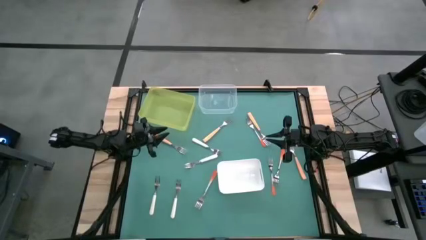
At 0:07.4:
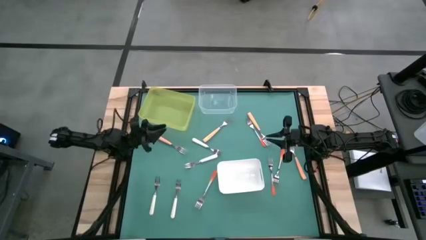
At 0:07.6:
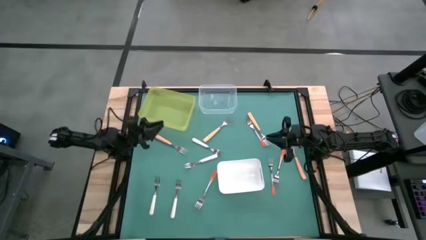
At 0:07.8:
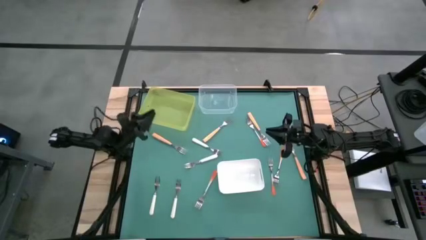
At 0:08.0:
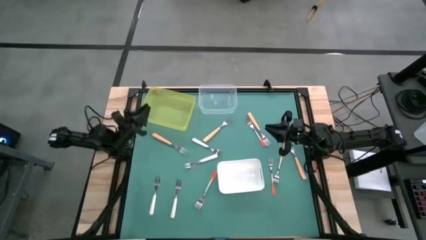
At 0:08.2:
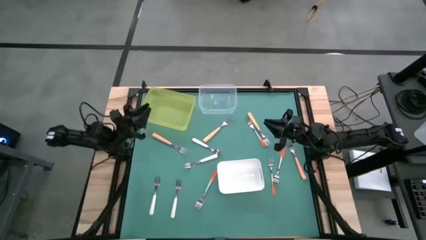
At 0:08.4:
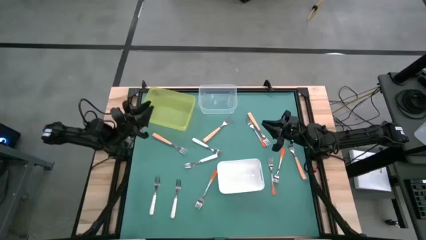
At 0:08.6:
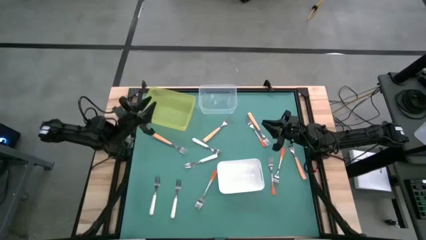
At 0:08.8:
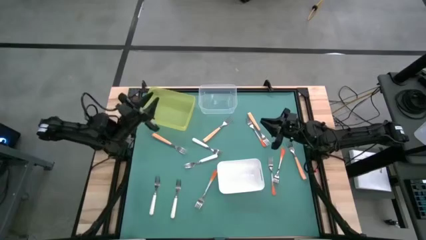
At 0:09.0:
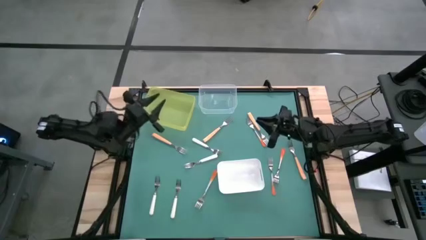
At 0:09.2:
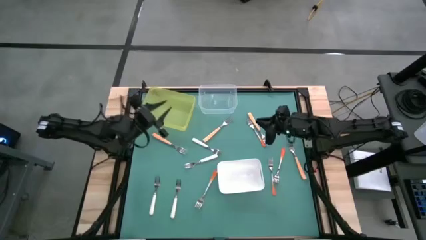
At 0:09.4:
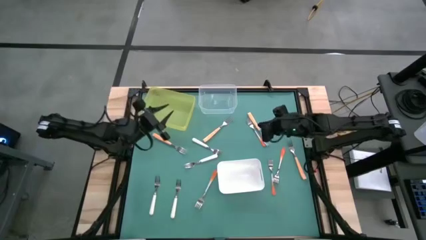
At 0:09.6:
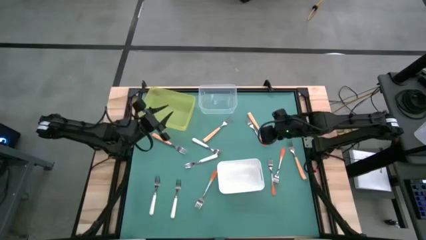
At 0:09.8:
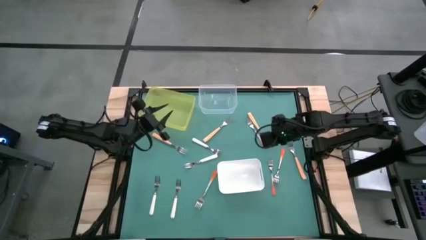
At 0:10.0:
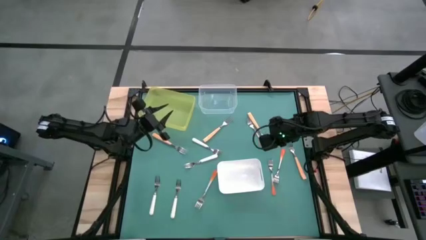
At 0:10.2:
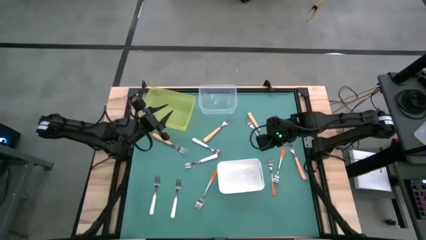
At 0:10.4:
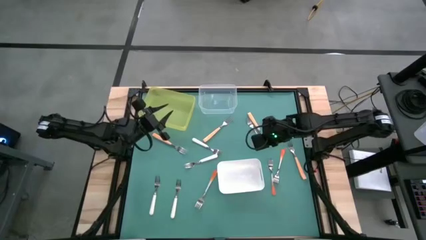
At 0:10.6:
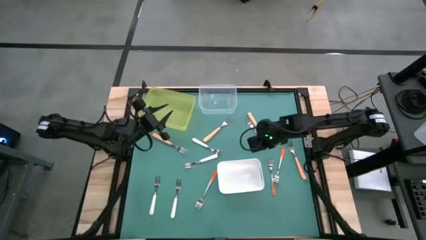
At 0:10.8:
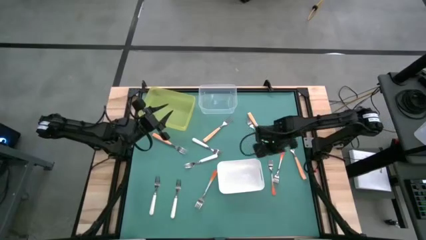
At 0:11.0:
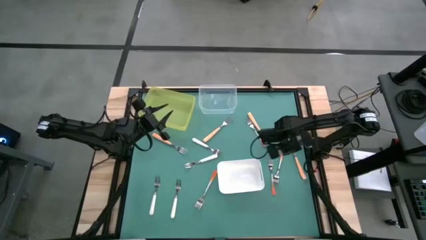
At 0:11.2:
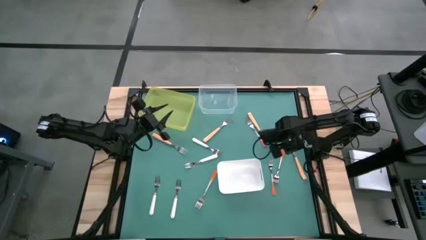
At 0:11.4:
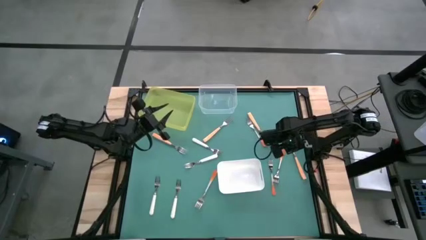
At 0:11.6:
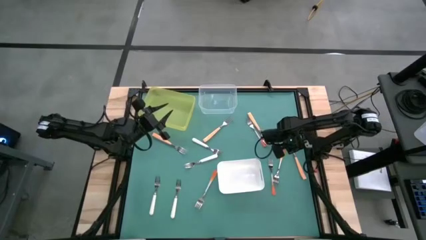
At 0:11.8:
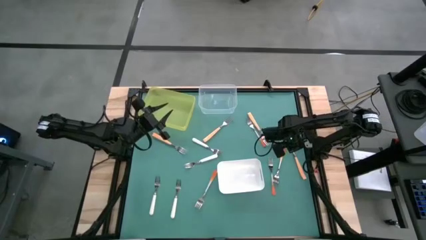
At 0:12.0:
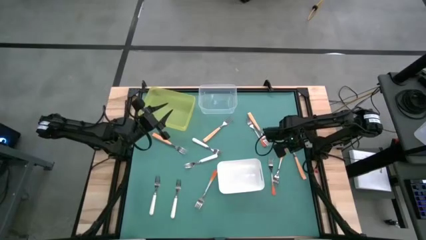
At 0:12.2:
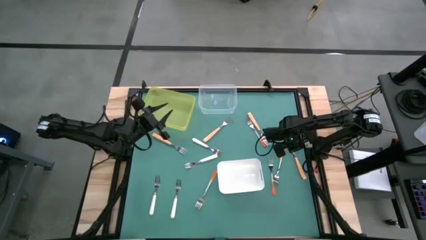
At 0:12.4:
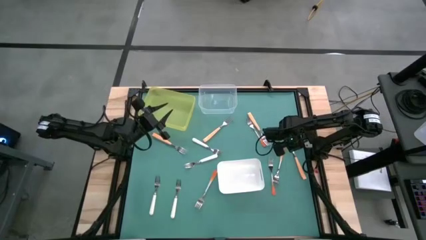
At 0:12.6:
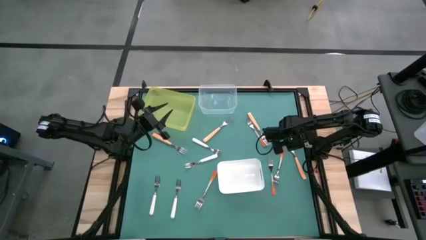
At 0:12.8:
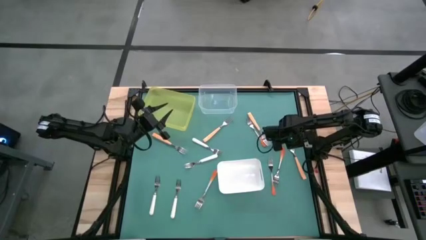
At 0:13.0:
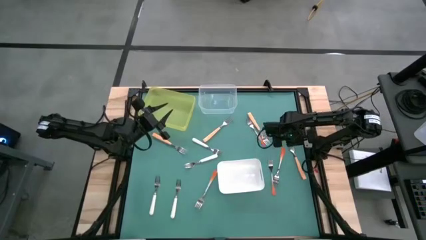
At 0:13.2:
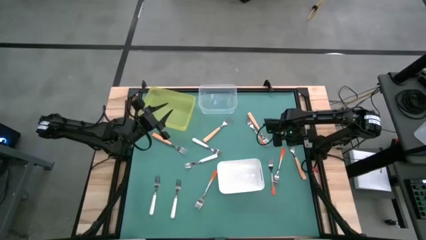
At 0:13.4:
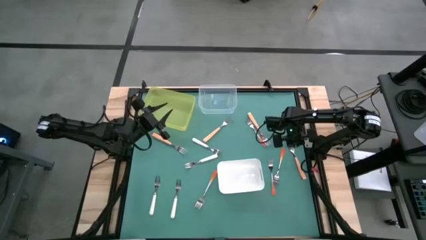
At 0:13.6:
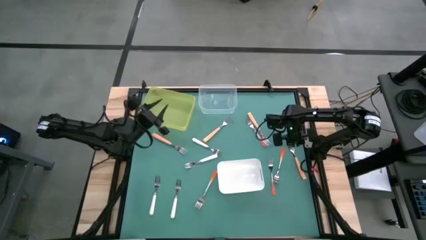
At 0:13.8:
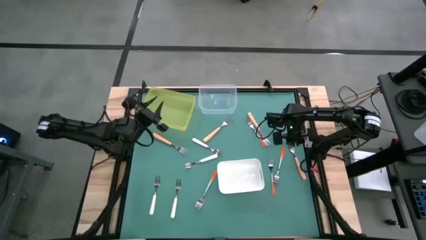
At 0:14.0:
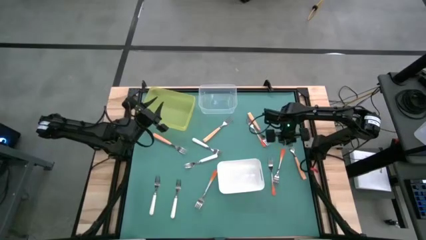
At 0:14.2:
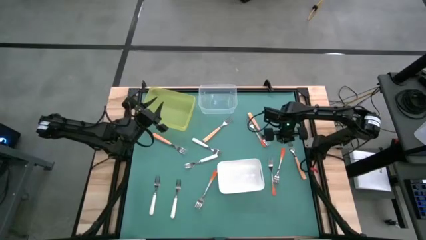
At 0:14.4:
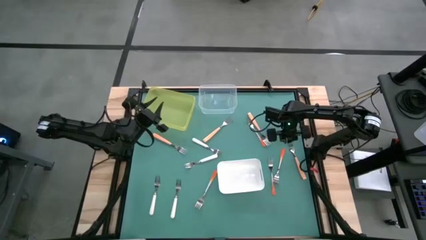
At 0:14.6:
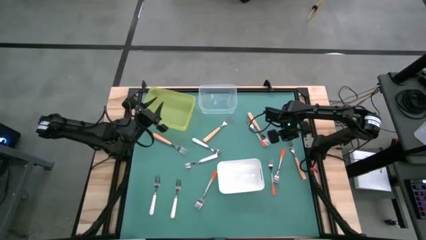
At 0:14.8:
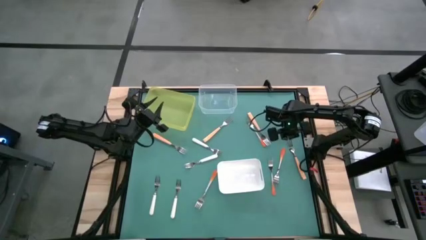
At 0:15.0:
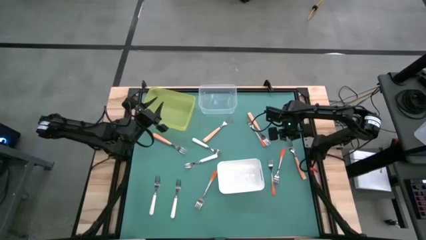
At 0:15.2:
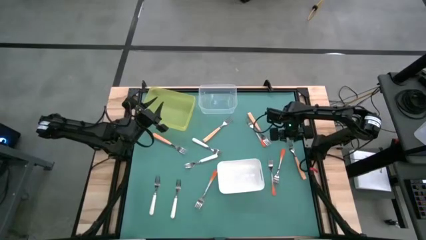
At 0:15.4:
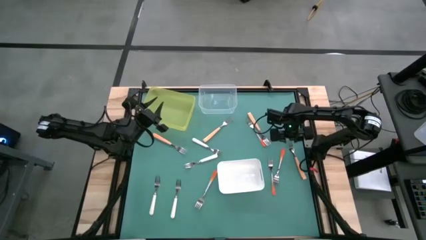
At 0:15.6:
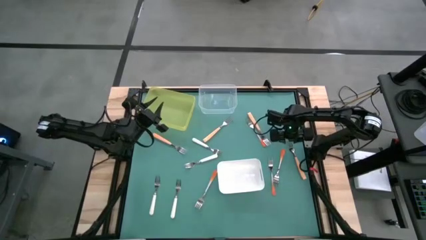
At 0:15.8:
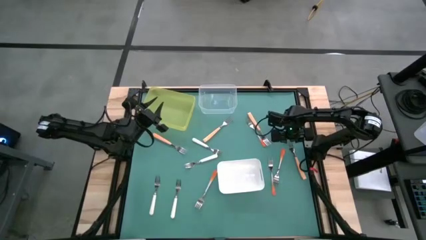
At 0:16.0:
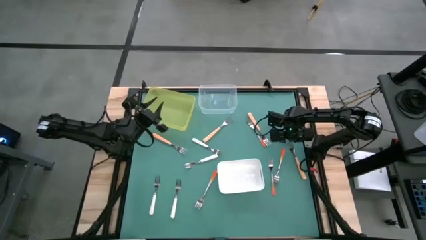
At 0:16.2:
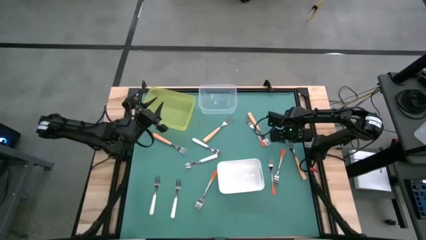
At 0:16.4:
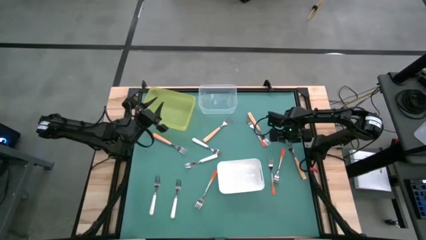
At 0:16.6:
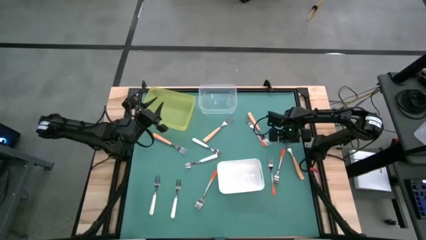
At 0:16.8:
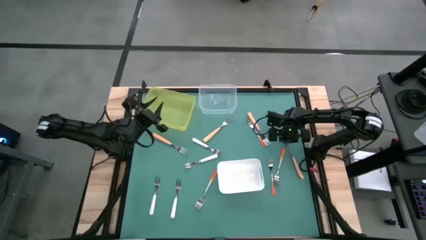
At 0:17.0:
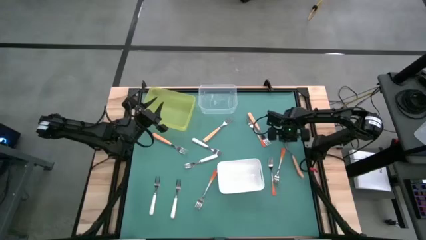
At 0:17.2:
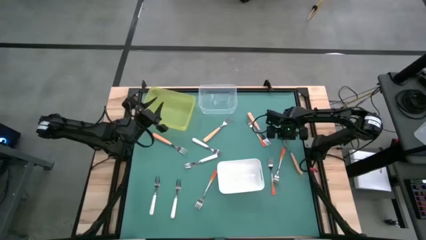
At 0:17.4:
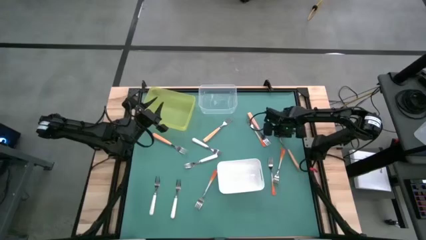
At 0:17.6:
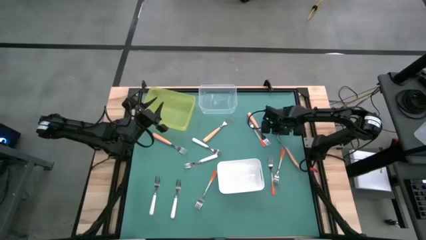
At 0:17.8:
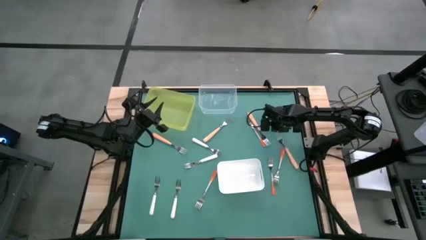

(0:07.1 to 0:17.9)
Task: Sort silverware by color (type)
Put the light orange into the yellow bin
